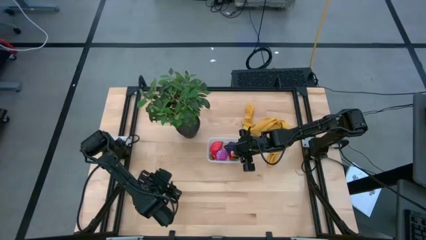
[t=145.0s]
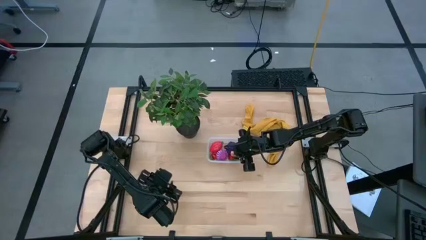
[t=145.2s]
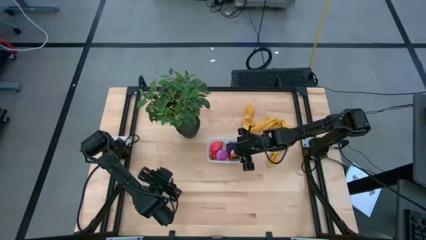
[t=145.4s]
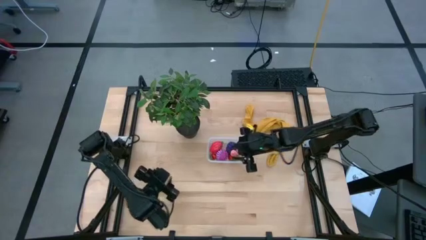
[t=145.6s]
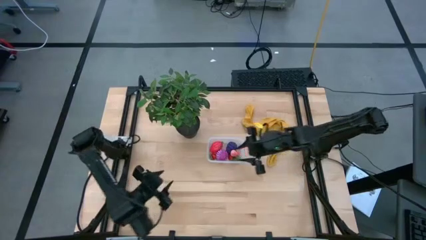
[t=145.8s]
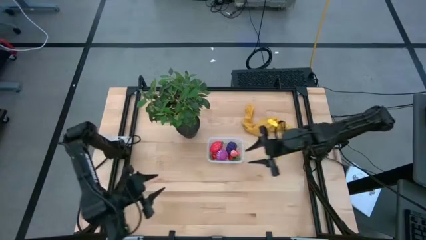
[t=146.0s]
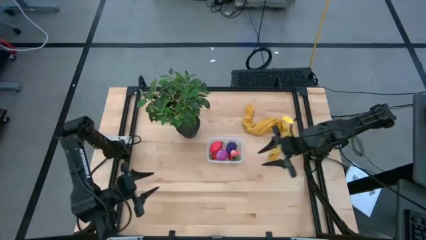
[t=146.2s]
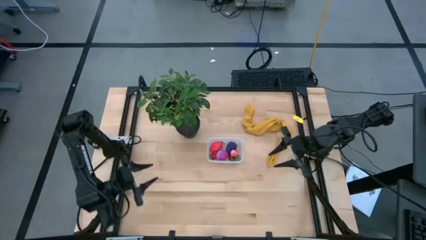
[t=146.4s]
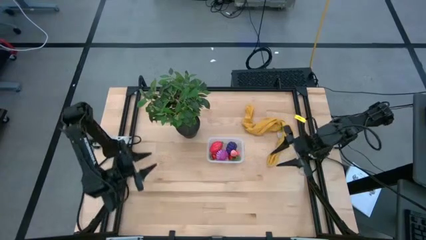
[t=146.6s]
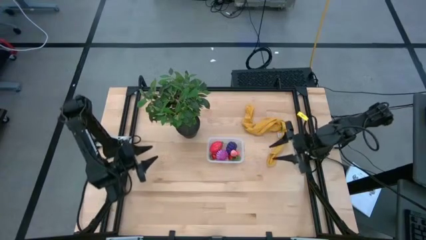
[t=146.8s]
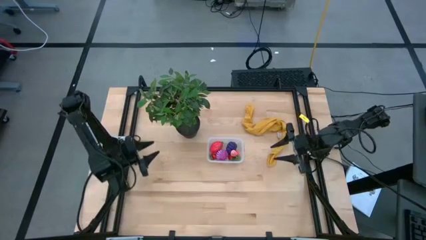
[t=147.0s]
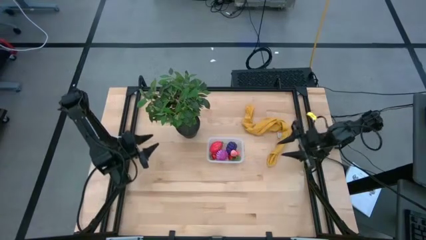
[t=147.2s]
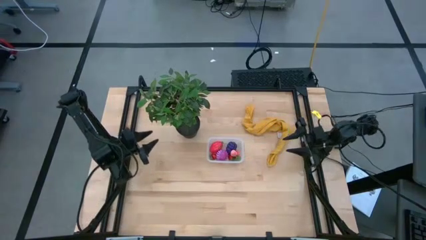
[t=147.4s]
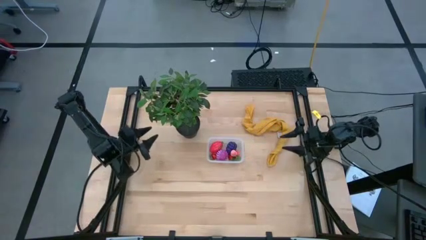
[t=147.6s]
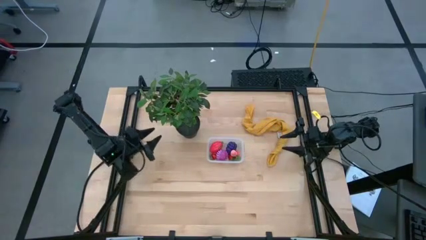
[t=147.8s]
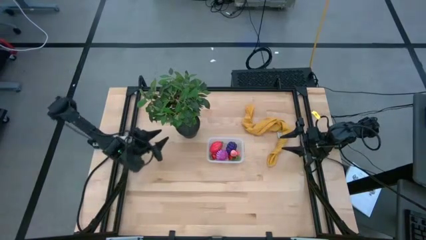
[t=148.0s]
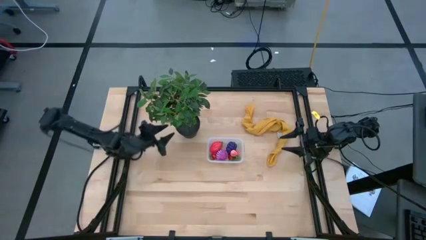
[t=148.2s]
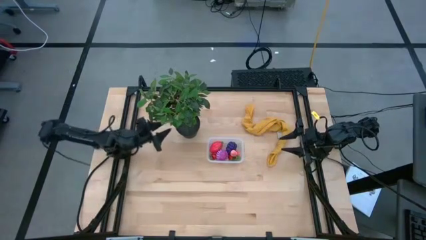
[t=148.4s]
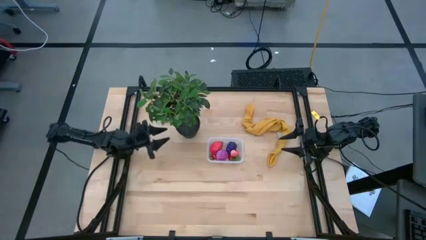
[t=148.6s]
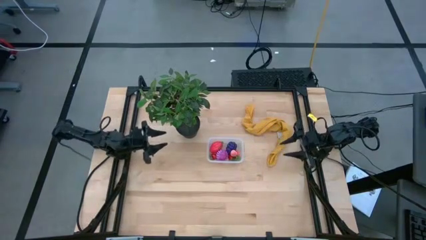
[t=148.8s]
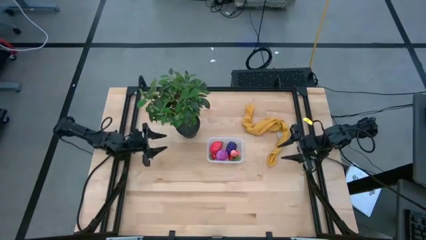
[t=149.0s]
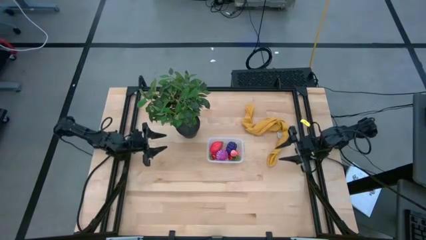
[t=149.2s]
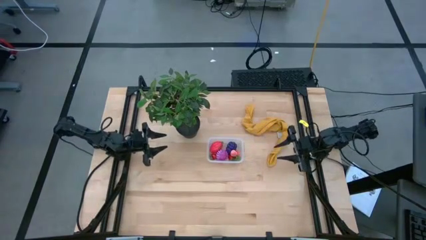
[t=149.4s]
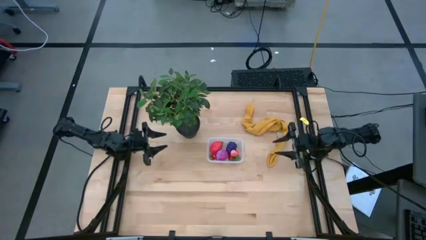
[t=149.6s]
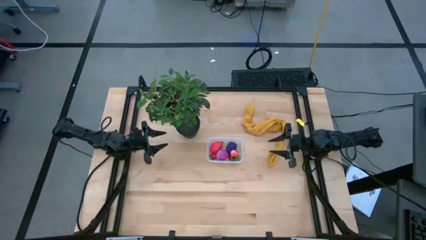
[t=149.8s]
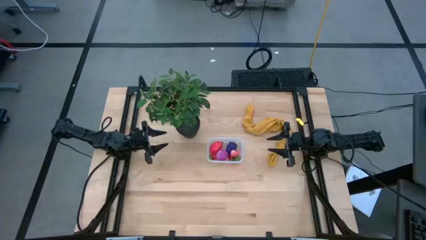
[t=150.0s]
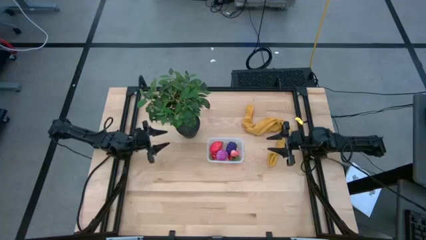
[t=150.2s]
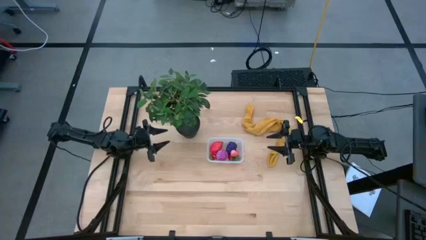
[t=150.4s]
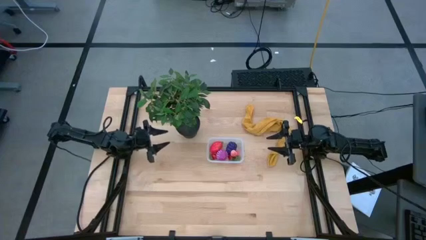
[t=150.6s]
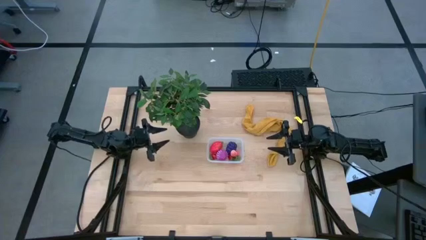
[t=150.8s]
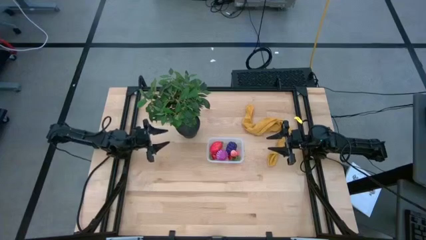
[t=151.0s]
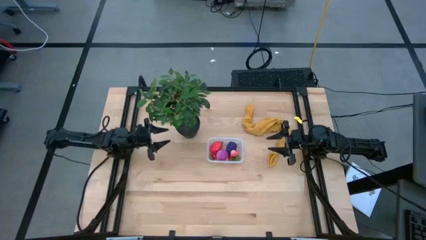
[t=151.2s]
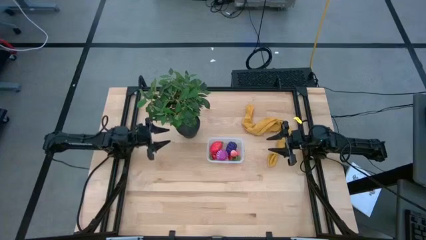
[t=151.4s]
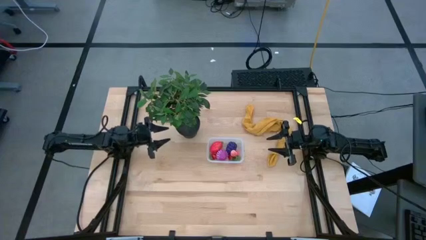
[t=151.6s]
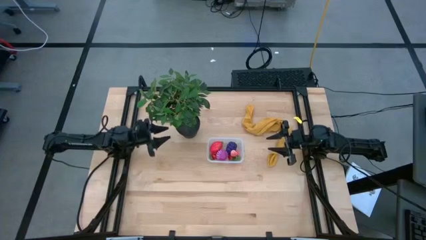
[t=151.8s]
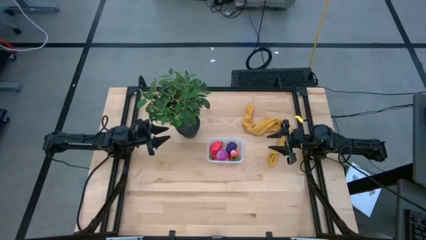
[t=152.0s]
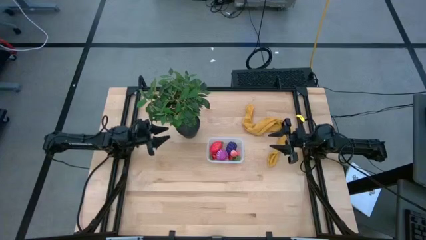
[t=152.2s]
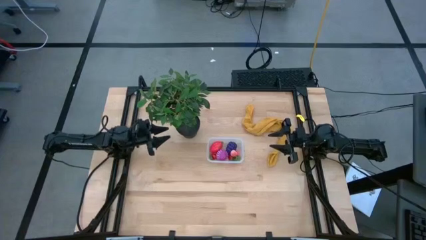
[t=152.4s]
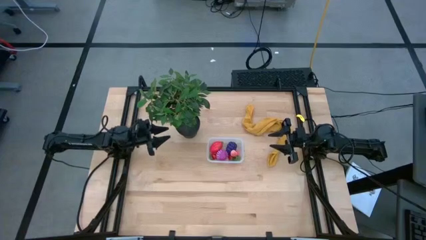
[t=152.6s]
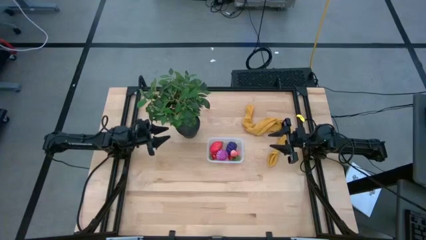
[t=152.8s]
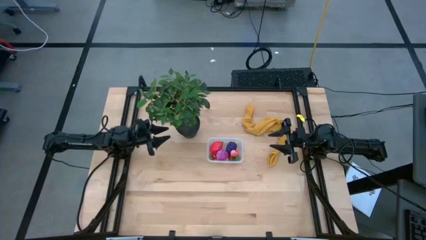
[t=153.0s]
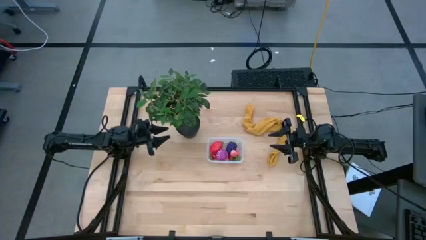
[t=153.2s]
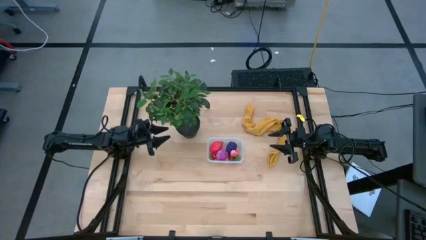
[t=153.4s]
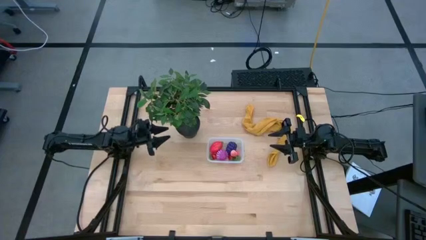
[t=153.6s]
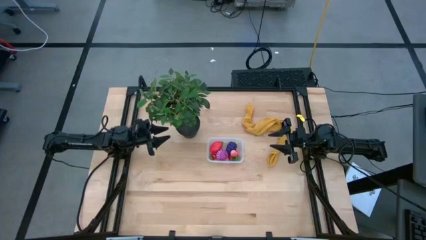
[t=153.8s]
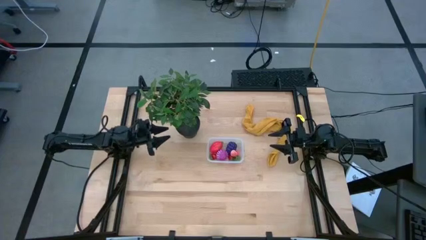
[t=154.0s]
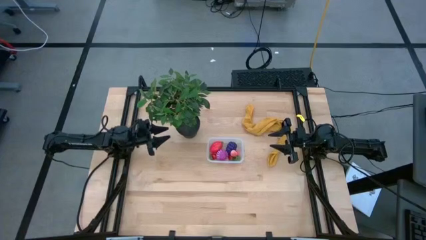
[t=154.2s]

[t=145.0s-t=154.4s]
Task: Pick and placing Produce into tupperware
Return to Home Position

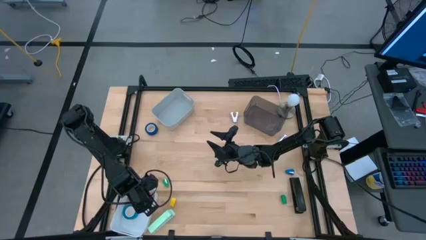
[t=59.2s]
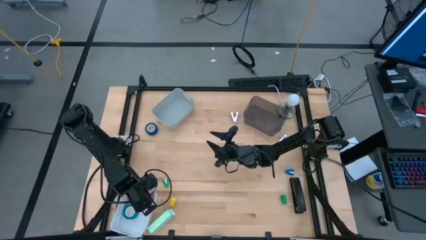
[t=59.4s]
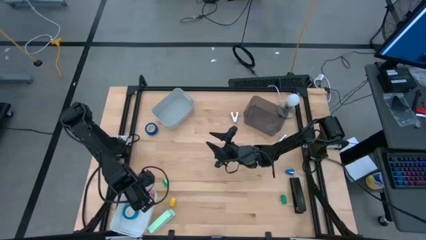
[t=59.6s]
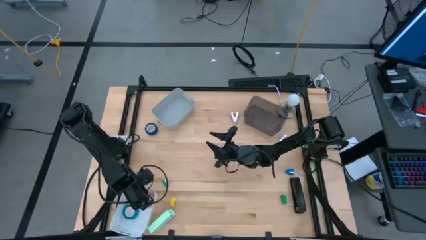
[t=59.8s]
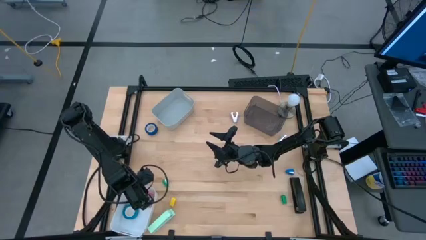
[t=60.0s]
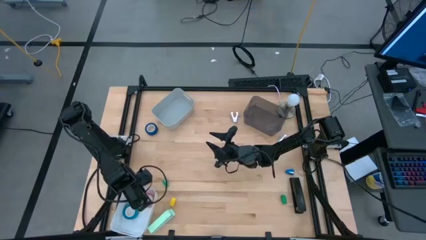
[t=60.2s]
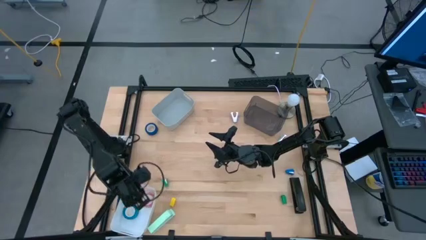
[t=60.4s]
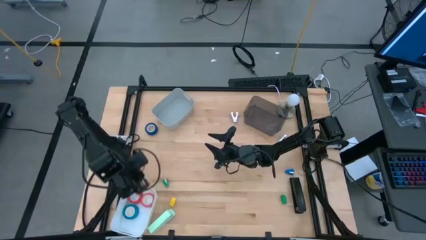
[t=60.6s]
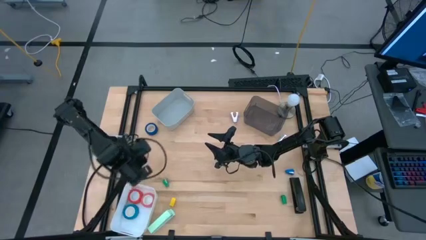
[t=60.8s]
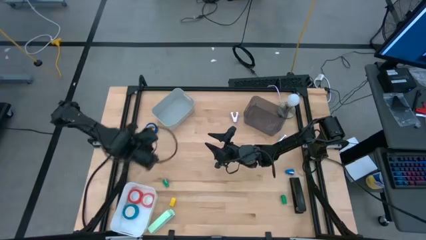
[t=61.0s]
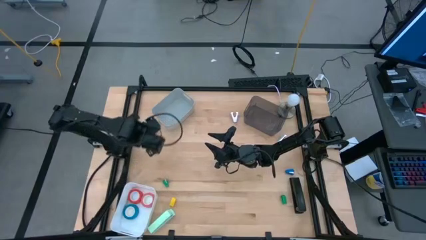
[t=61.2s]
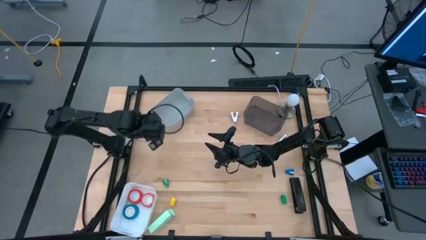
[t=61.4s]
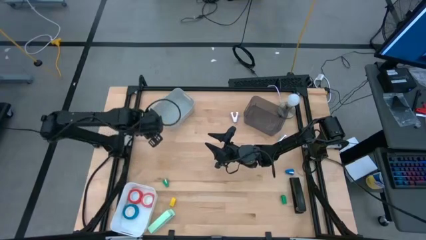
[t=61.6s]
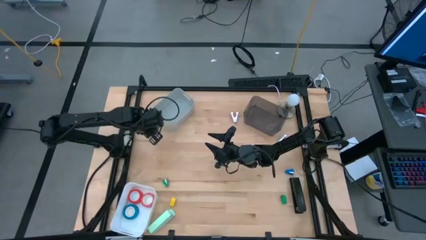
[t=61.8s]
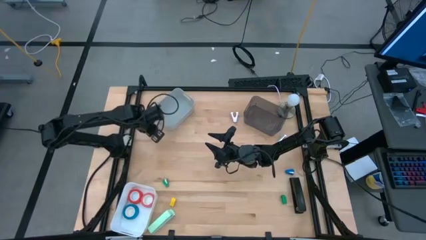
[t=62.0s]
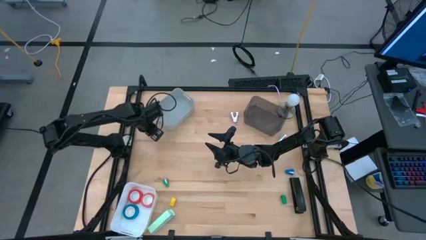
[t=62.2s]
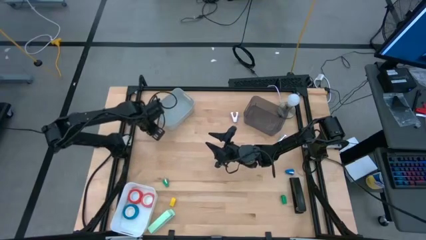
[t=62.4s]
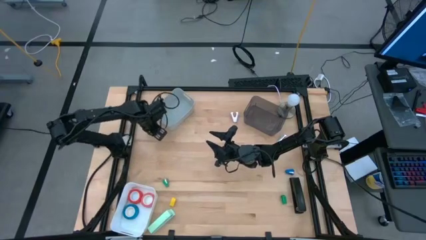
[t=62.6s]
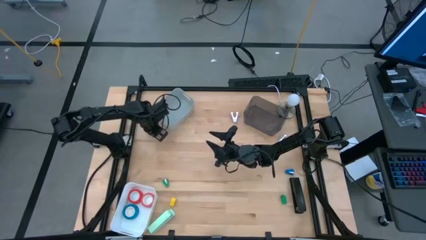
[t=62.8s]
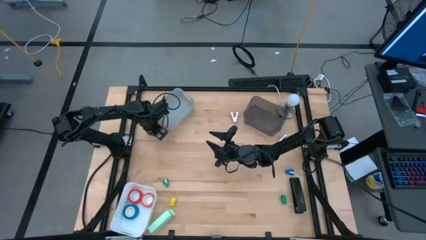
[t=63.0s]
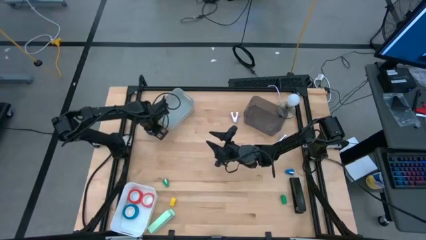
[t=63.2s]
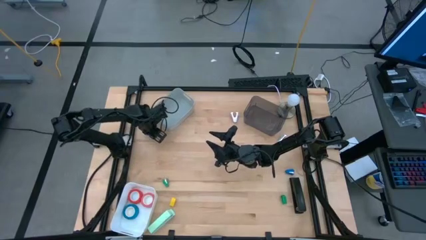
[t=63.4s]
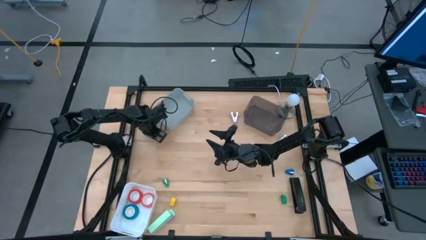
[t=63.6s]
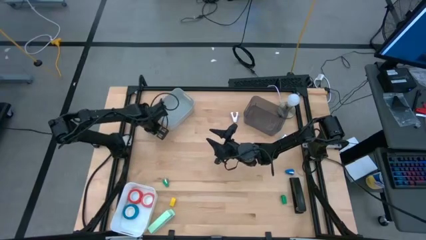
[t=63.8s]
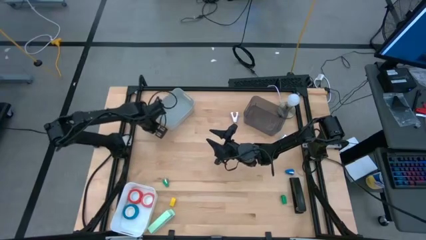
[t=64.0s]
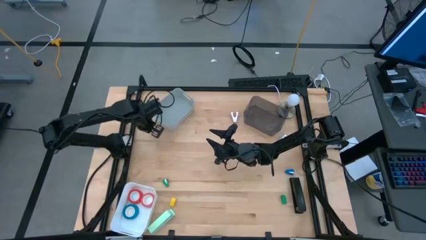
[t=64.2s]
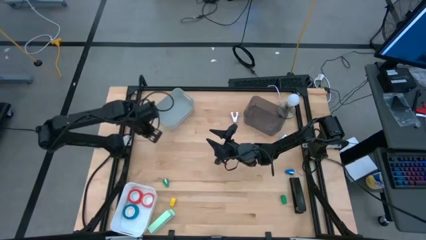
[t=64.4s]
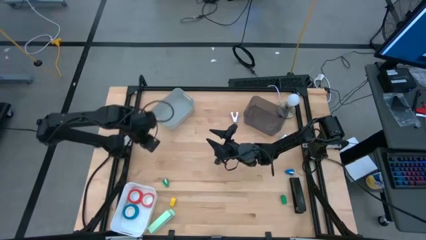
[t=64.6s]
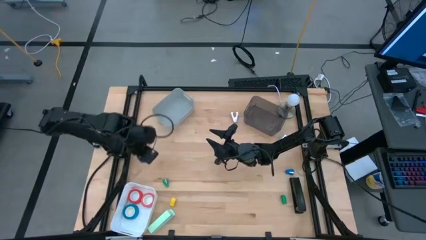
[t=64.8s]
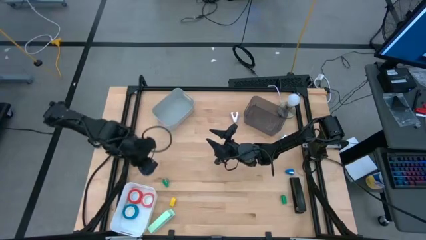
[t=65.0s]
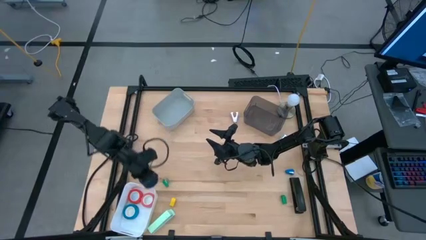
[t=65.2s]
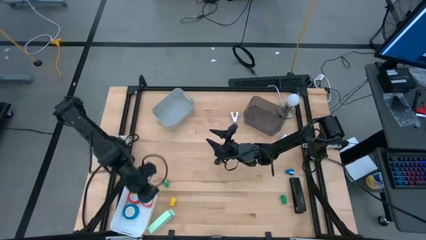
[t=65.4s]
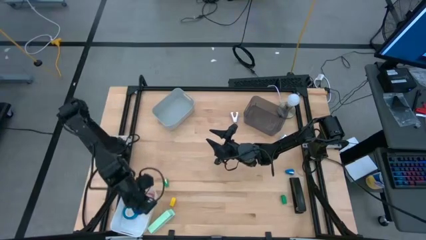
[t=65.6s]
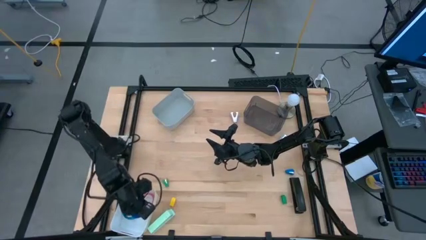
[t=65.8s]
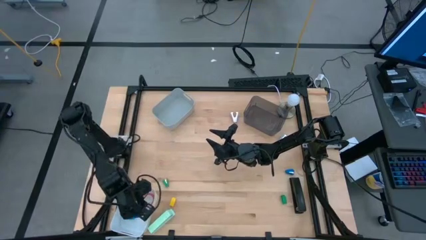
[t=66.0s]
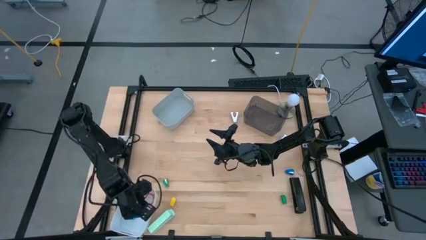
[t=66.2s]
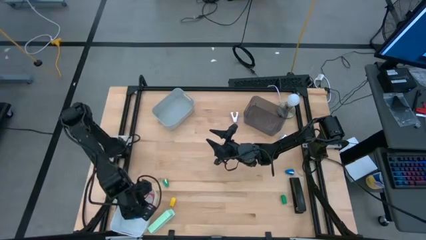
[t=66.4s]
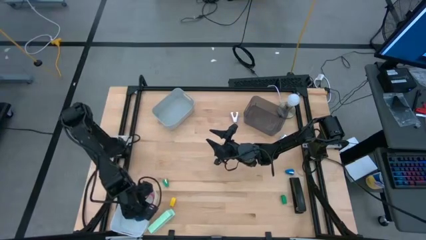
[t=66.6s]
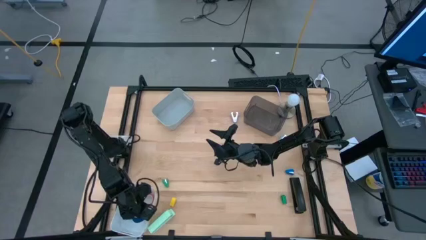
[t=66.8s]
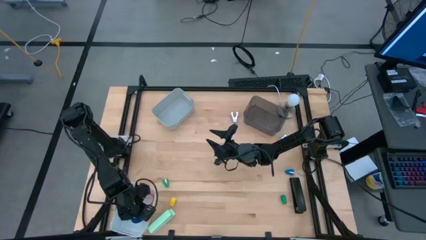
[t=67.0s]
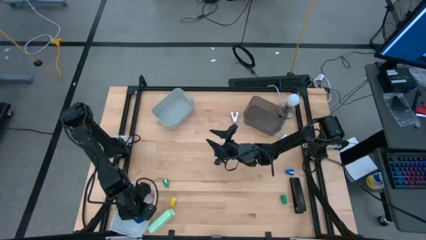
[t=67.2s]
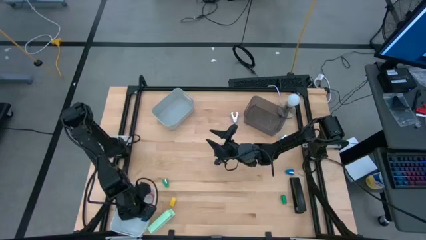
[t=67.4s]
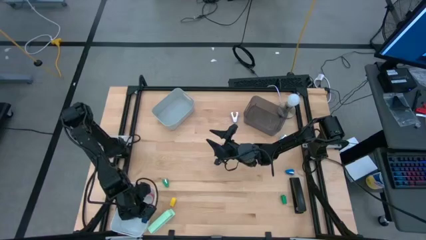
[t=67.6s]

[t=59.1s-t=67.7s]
Task: Pick and place Stapler, Stapler remover, tape
Put the blue tape into the white bin
